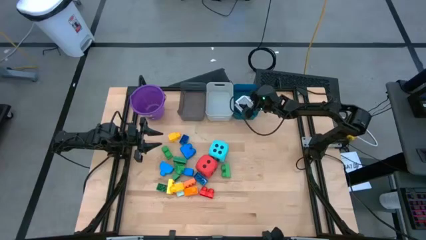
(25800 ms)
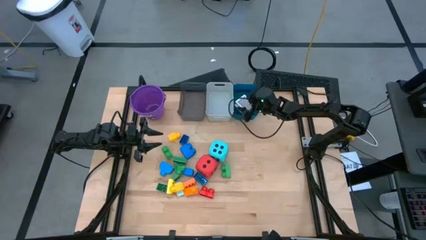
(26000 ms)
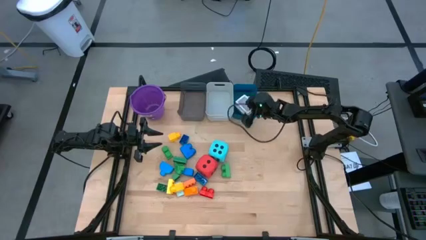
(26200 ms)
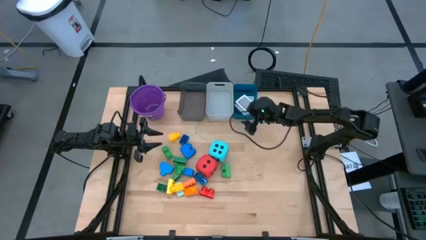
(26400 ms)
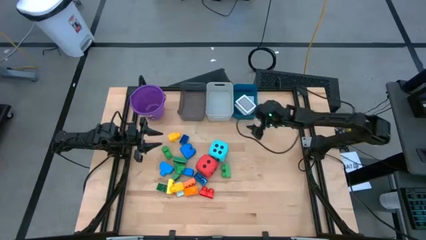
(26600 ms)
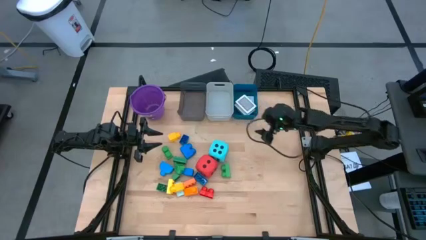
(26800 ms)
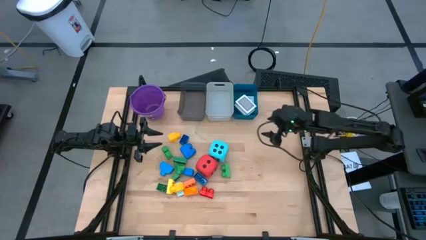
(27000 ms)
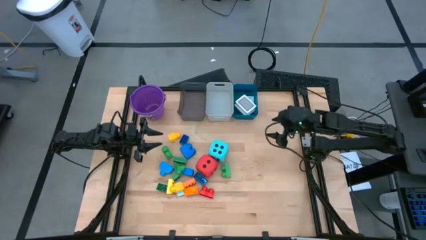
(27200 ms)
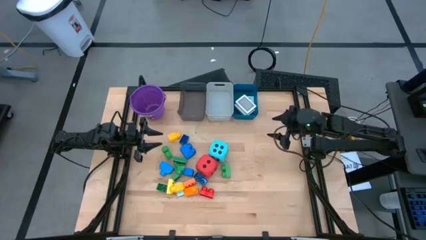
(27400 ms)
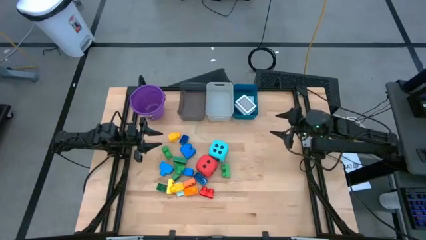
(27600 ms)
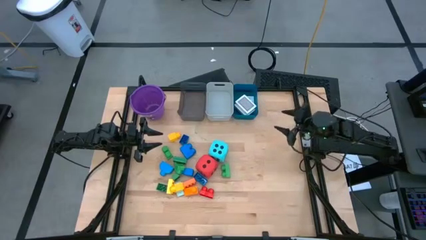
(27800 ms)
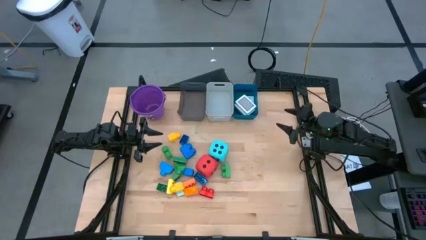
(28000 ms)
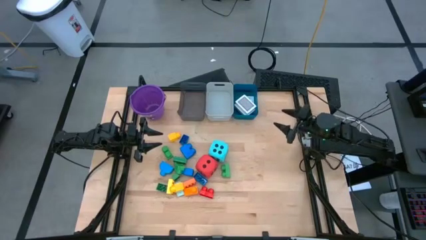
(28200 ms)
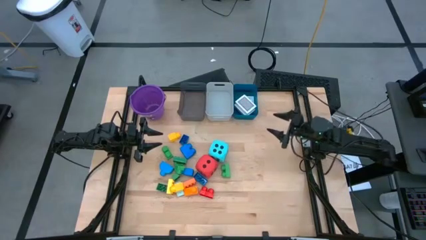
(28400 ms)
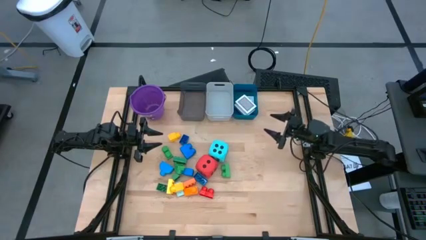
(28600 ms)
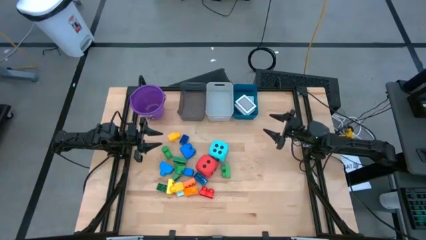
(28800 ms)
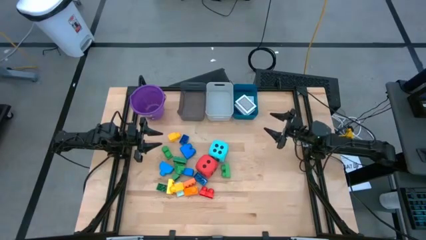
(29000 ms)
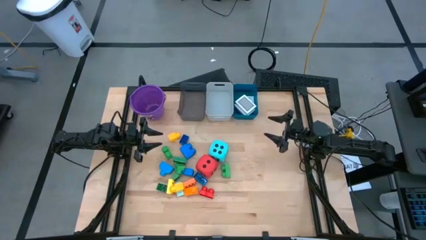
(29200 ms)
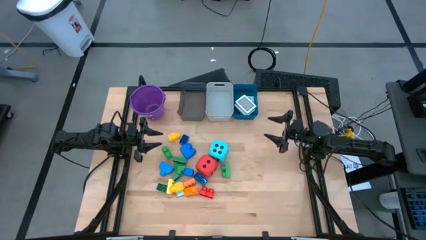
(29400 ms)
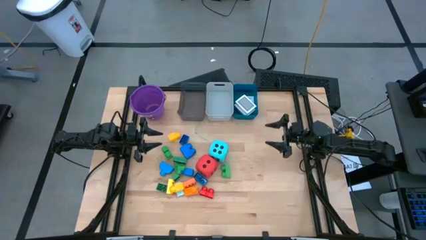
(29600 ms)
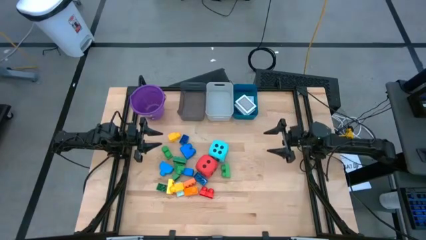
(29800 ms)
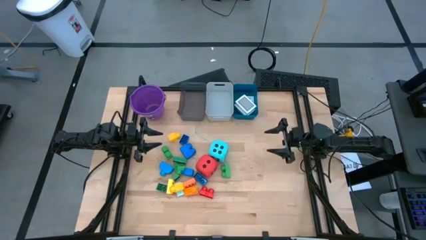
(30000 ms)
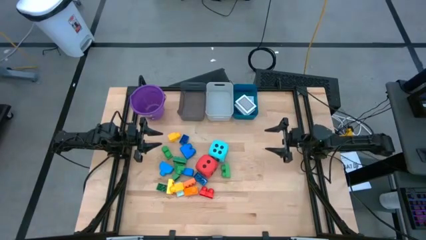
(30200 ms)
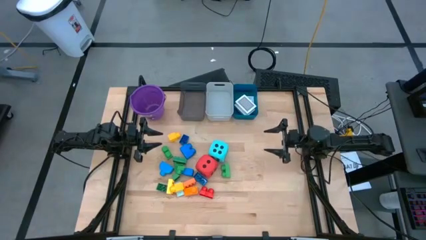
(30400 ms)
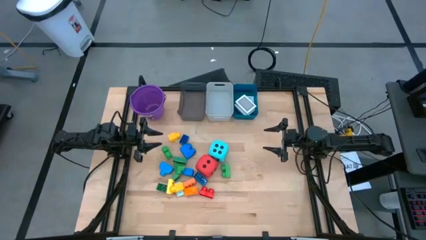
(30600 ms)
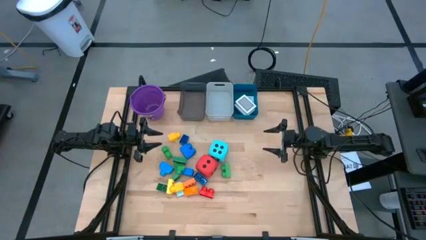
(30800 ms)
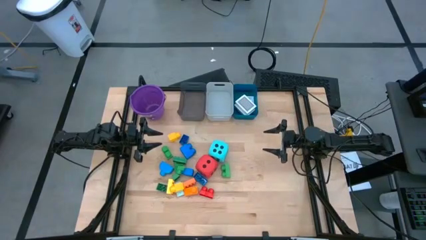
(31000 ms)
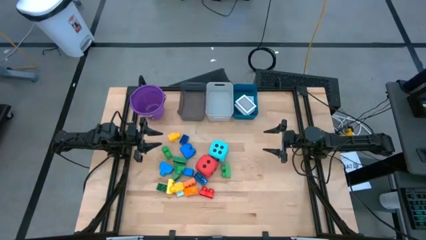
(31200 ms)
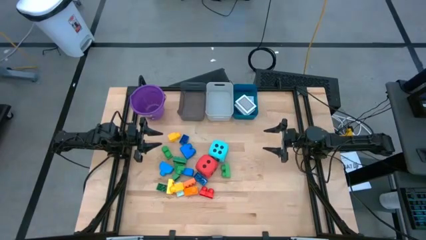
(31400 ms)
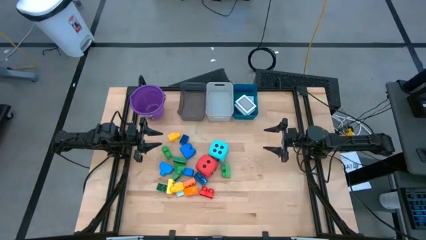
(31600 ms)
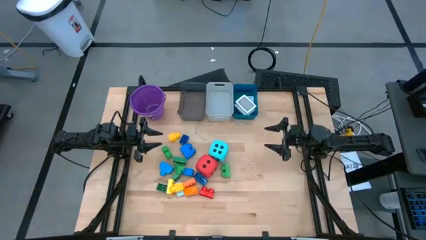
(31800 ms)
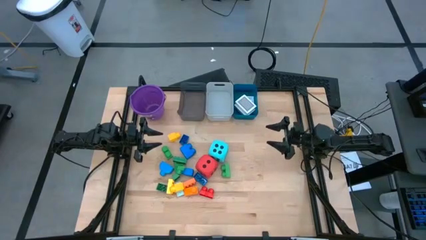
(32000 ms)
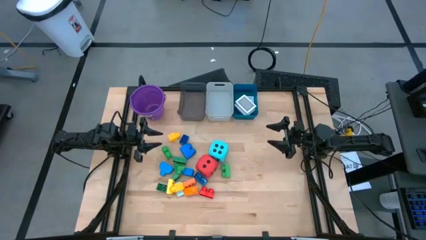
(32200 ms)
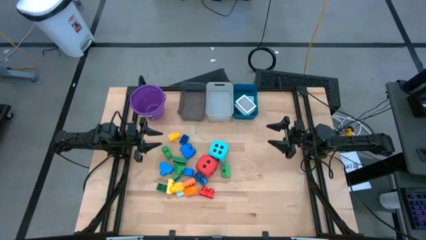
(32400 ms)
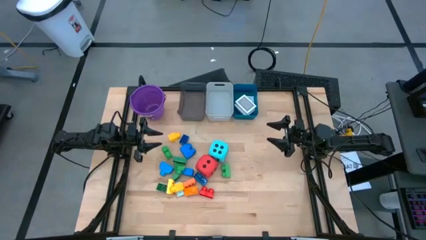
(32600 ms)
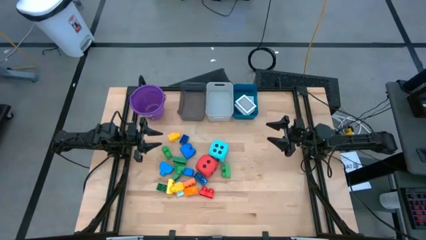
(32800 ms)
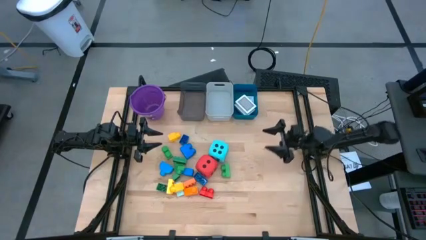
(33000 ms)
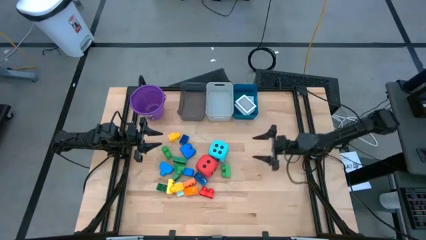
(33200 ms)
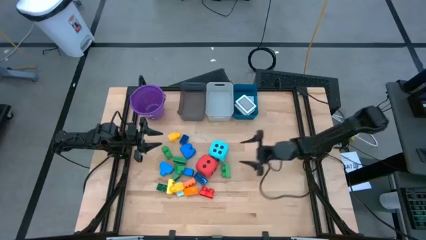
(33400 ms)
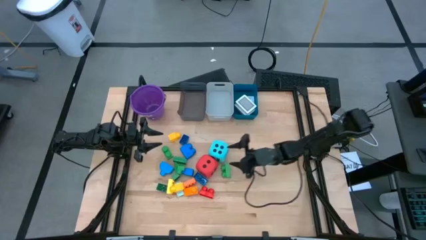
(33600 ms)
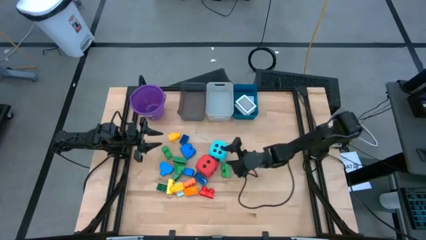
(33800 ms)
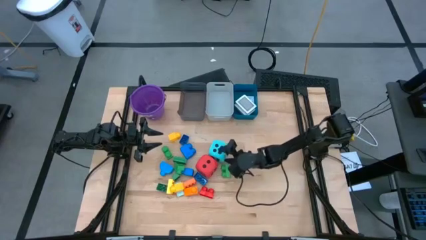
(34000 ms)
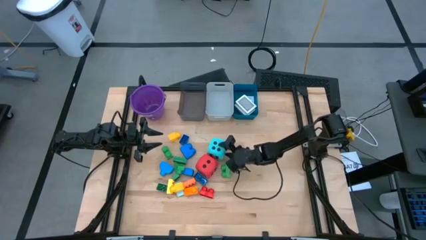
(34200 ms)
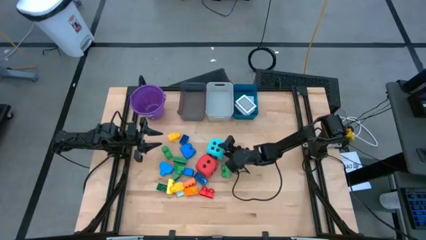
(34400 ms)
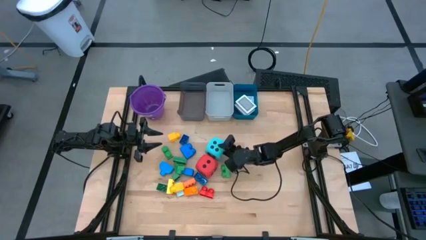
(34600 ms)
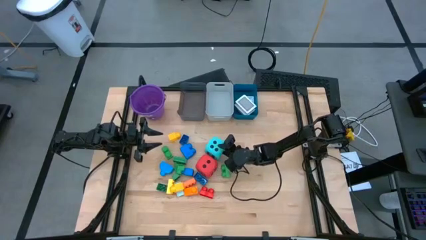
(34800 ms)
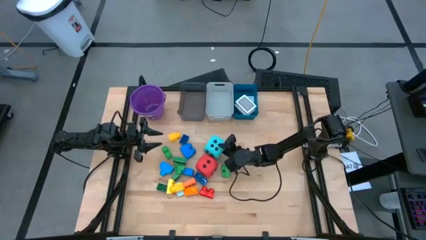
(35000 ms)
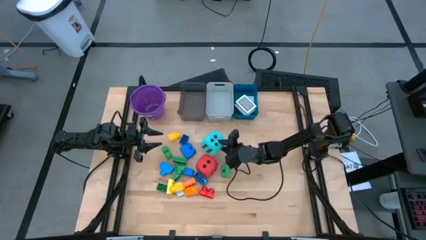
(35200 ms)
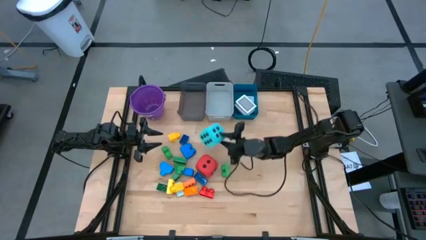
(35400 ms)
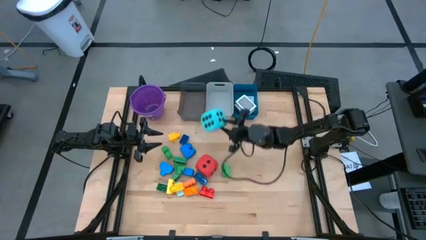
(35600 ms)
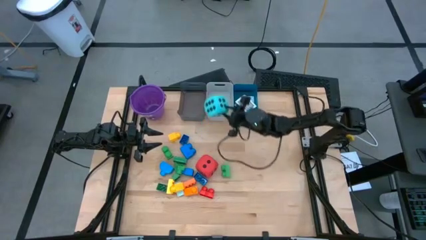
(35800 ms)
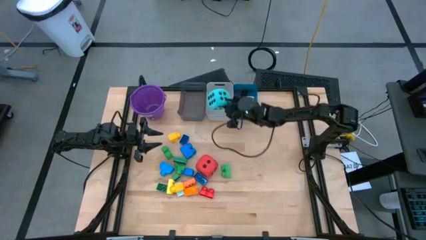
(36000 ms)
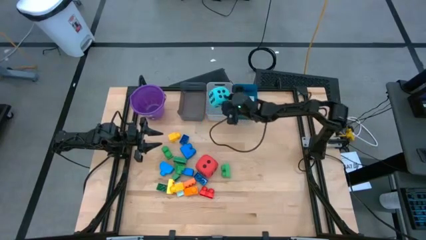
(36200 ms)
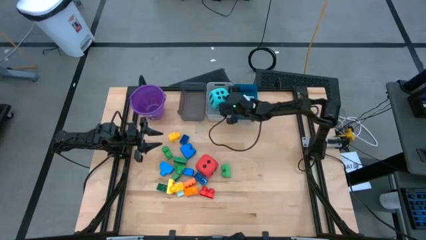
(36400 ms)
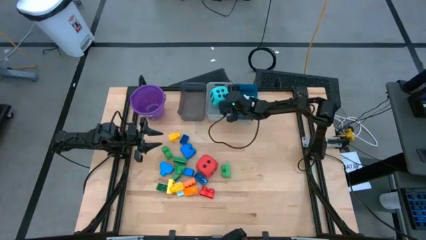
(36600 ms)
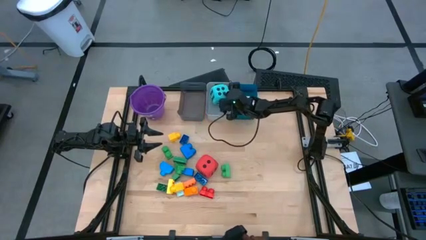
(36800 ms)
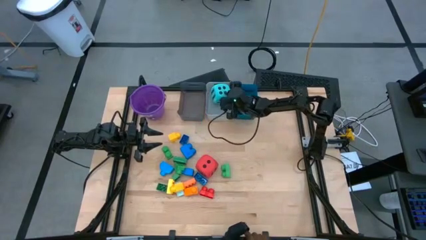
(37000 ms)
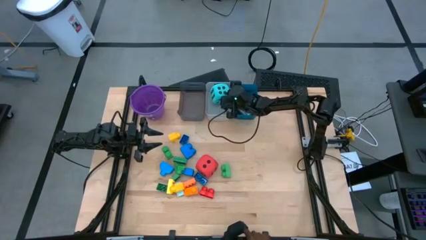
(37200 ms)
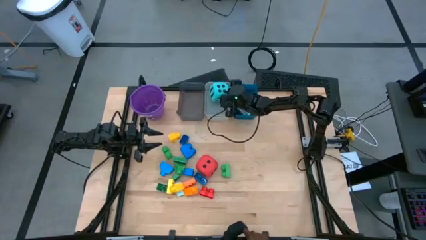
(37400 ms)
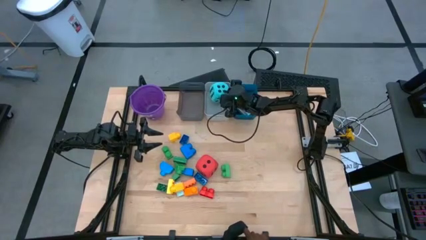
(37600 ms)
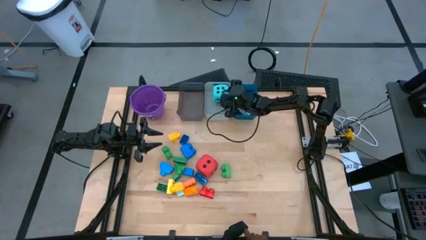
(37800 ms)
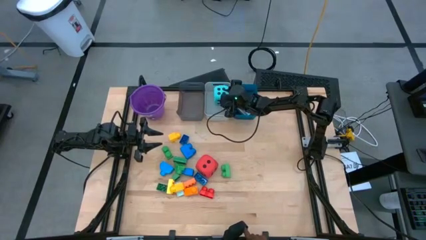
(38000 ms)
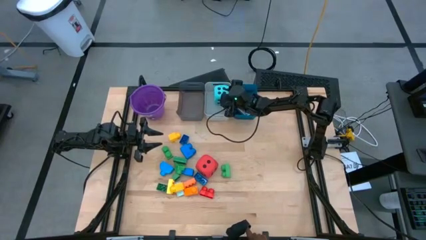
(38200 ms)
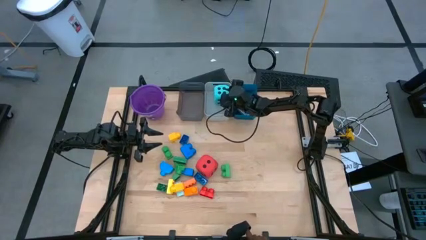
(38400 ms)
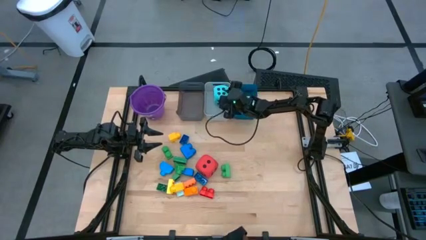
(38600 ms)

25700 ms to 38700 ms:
Task: Pick & Place Toys
Put the blue dice into the gray bin
